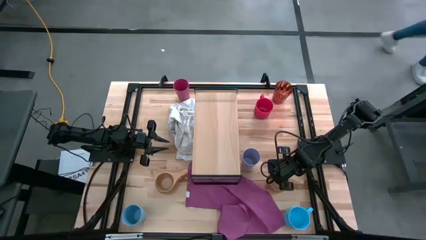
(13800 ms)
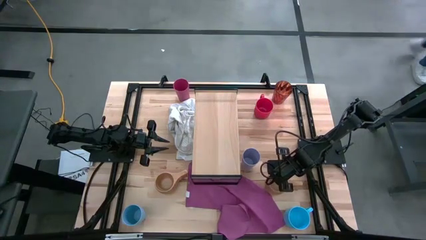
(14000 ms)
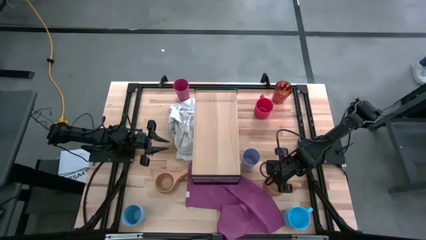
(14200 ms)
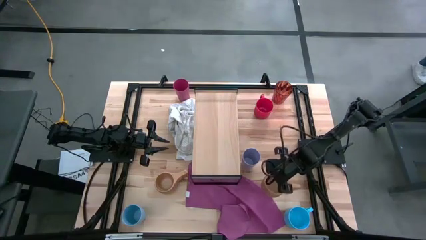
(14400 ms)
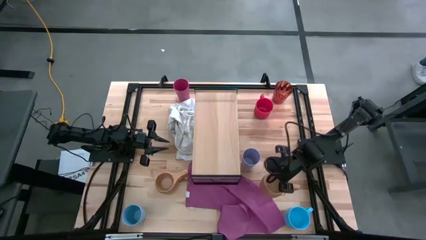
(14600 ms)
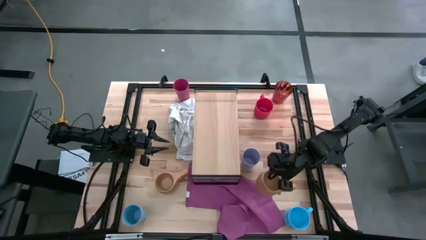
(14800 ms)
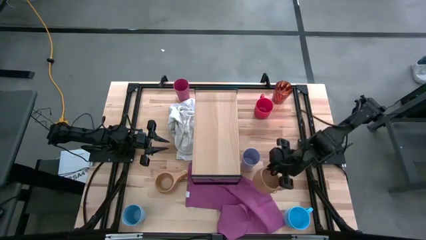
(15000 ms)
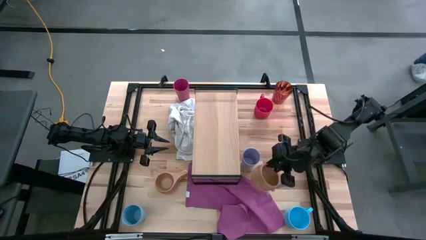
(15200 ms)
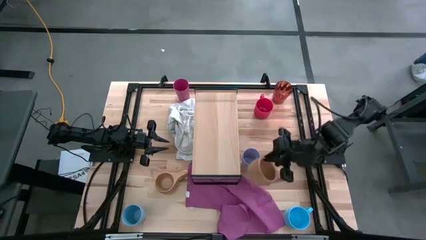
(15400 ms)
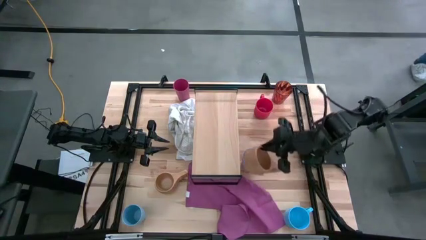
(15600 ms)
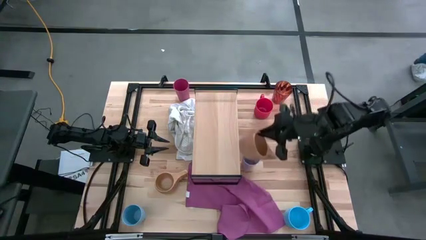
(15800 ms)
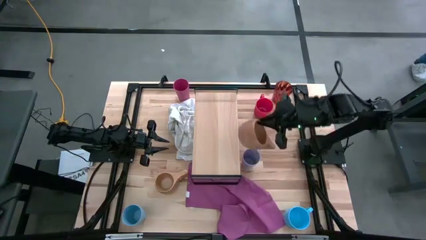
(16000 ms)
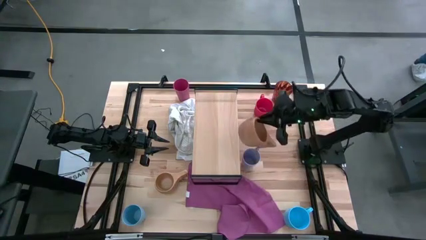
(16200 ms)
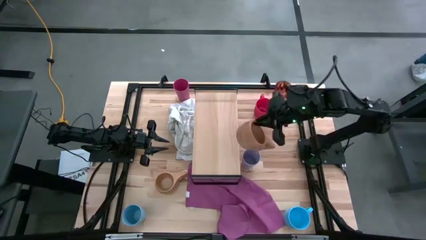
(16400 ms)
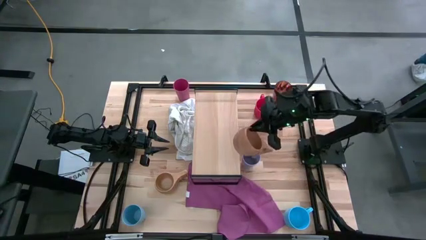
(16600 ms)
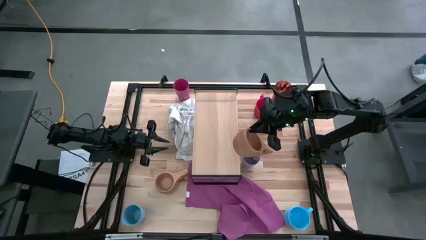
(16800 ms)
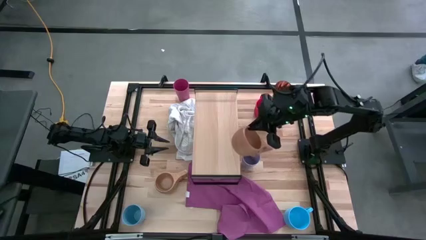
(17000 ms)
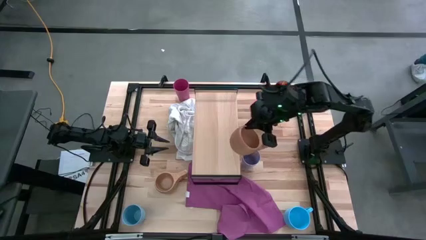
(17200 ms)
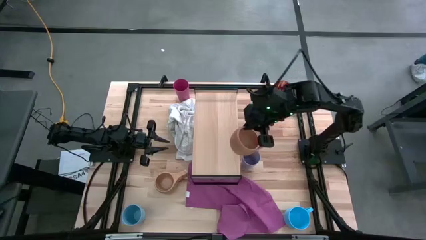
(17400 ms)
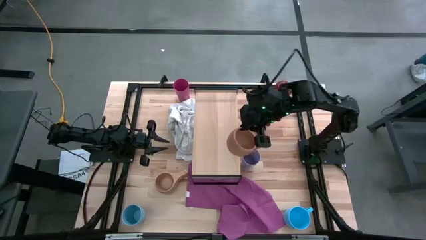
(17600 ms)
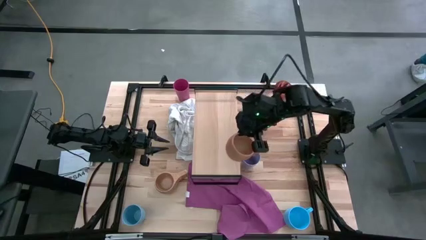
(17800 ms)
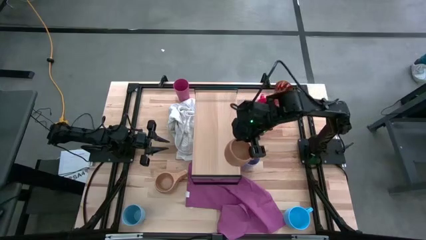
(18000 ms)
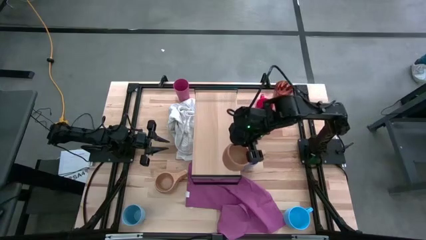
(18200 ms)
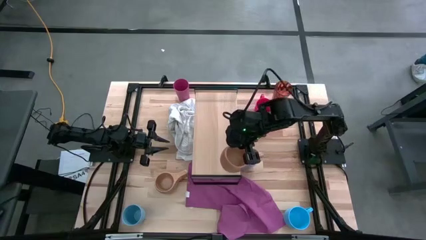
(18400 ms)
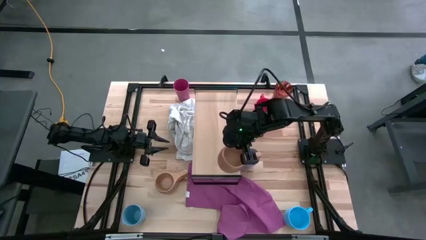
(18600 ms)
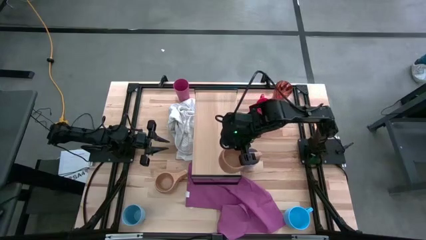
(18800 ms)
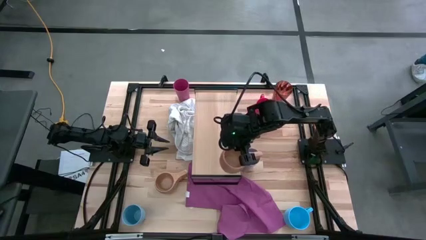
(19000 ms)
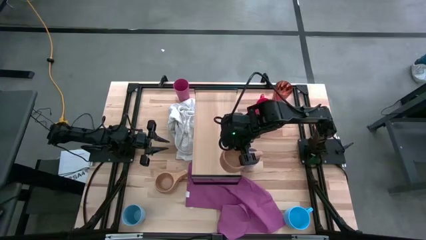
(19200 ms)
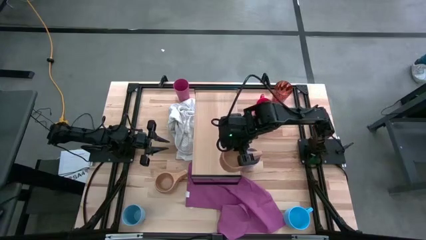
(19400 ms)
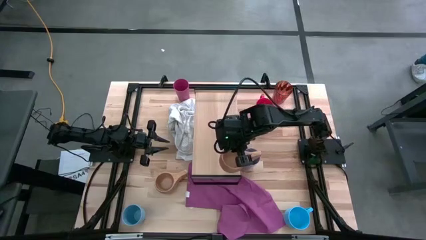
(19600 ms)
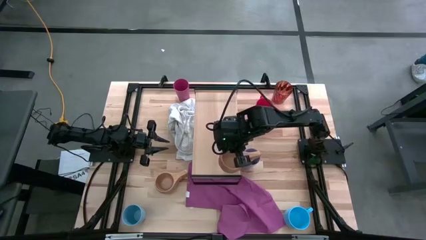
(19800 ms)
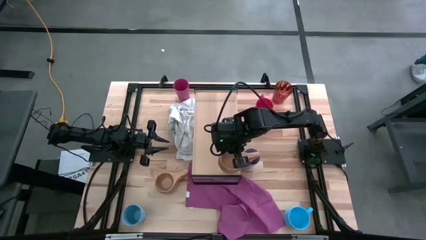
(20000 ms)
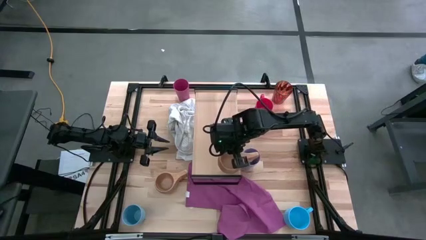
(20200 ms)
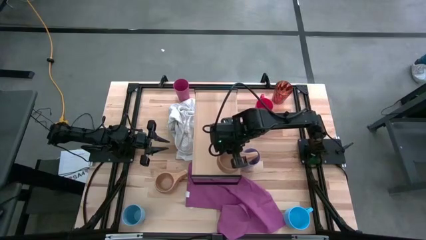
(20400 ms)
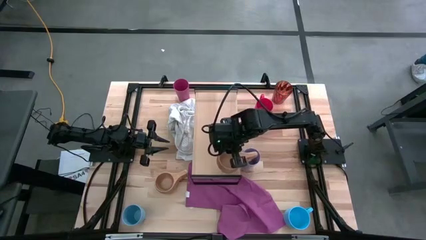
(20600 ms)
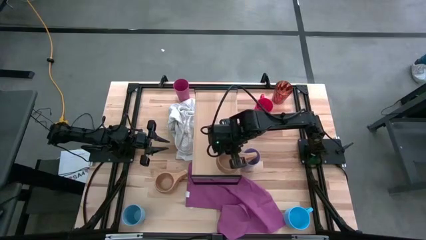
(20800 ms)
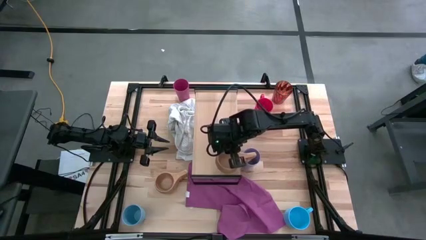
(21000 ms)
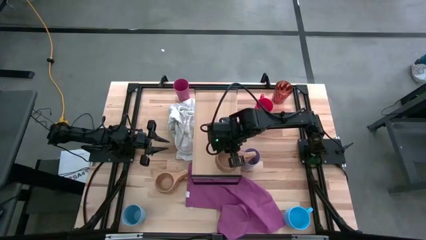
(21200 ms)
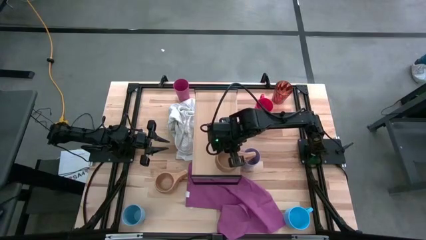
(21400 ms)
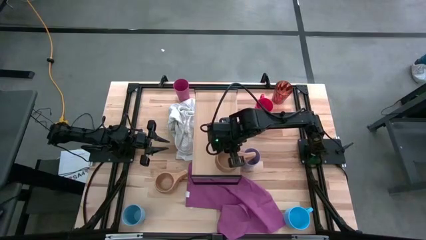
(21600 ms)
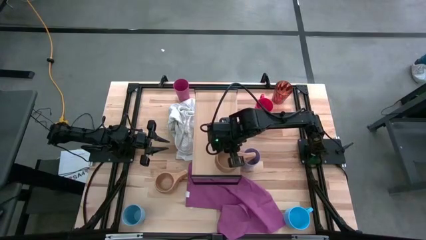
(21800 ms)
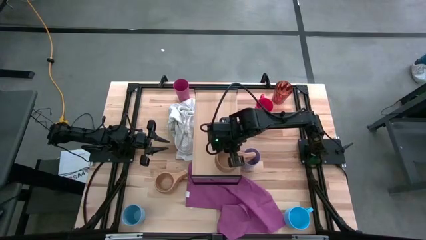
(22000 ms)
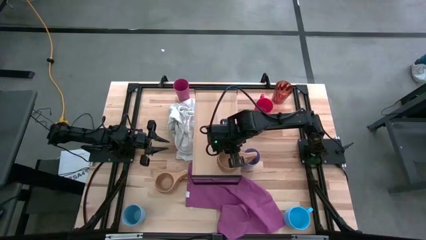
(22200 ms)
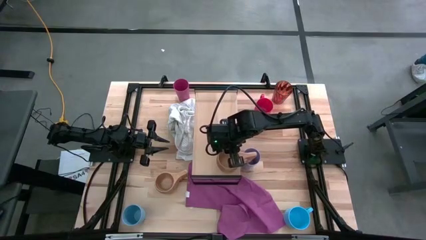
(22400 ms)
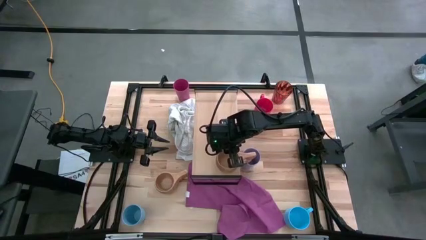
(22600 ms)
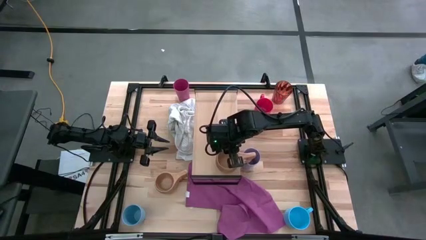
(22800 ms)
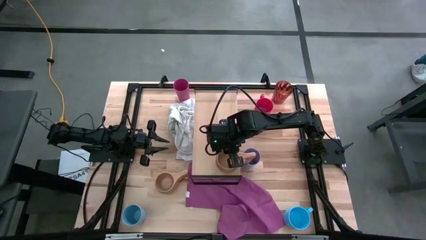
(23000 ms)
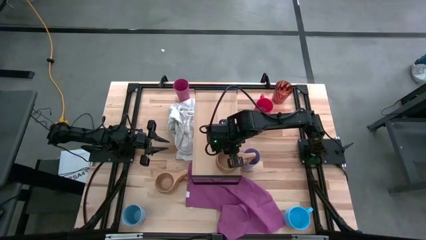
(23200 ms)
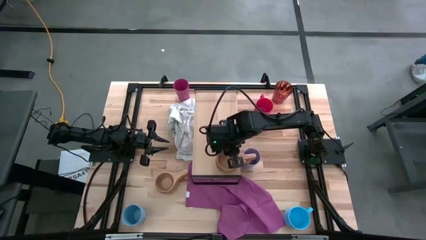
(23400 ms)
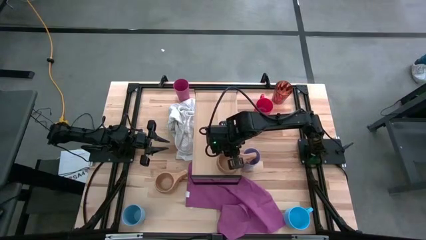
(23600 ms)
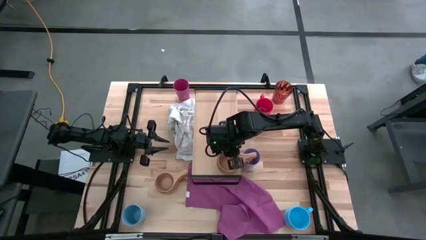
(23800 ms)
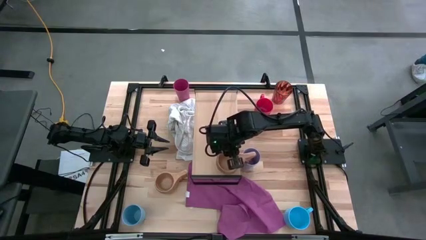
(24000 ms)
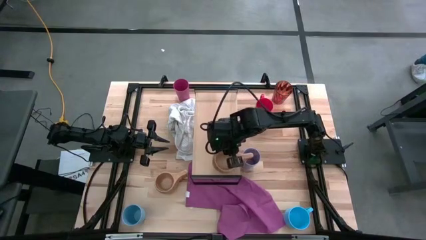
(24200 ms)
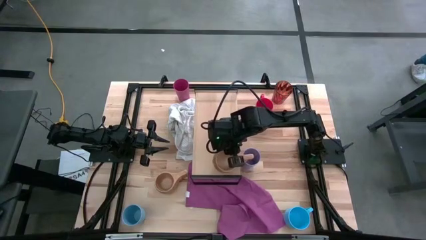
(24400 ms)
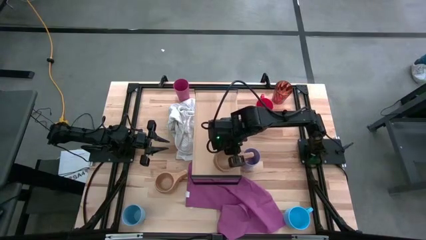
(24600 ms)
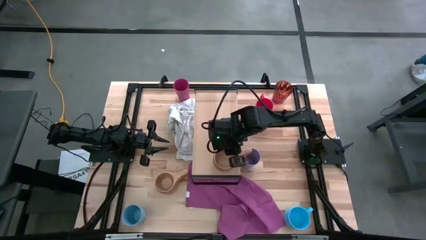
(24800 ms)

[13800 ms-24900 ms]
Task: Stack small to large cups/mugs on shelf
Put the right brown mug on the shelf
